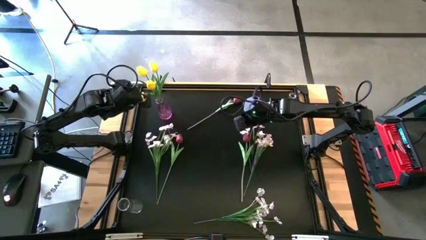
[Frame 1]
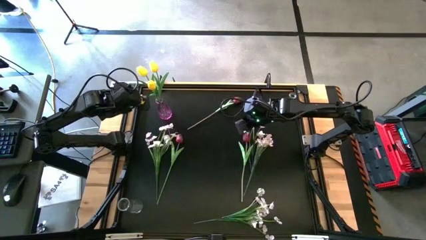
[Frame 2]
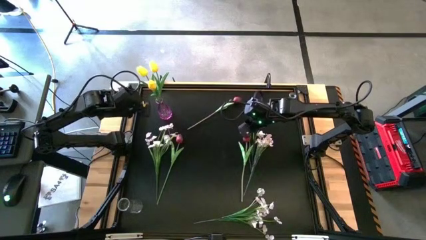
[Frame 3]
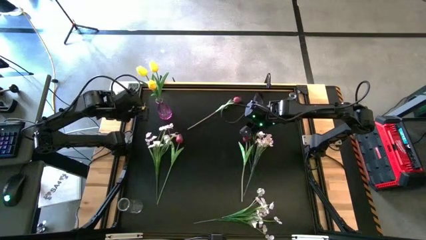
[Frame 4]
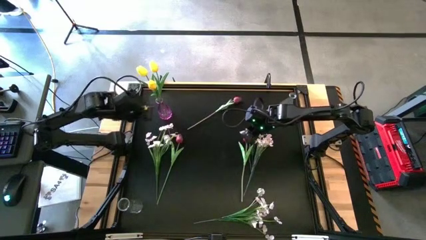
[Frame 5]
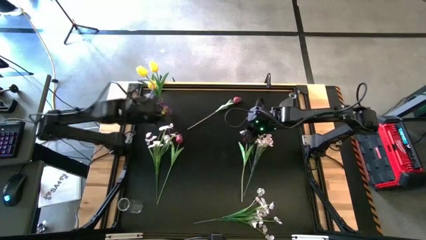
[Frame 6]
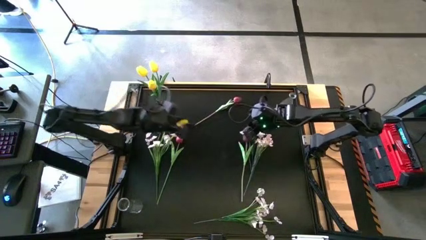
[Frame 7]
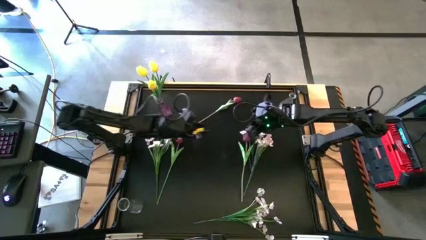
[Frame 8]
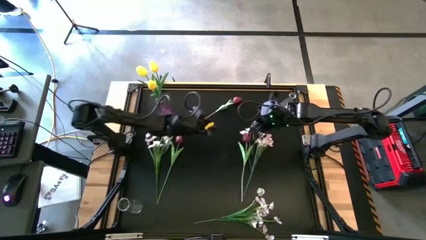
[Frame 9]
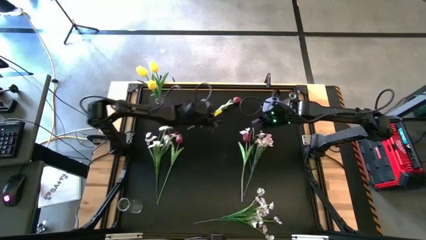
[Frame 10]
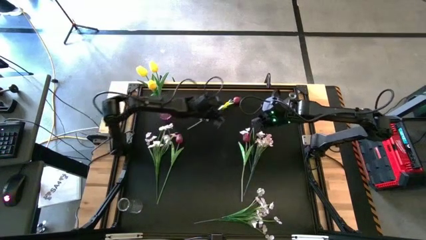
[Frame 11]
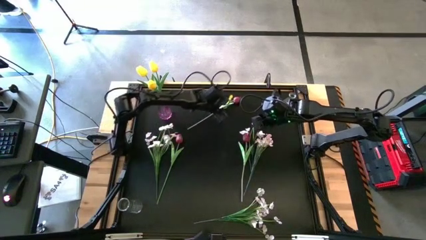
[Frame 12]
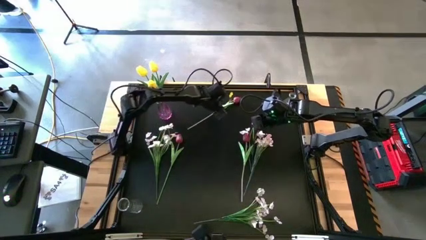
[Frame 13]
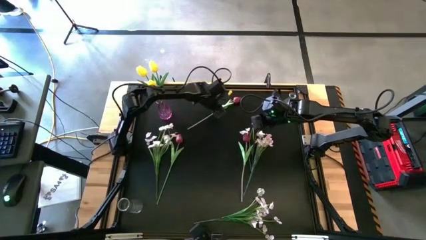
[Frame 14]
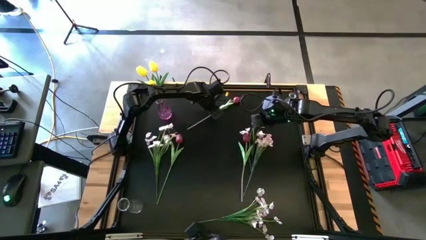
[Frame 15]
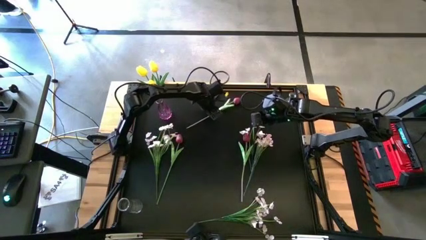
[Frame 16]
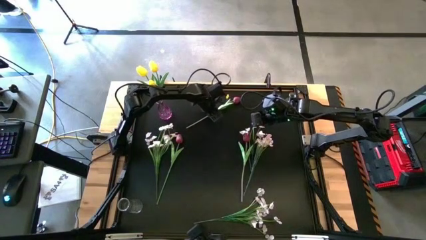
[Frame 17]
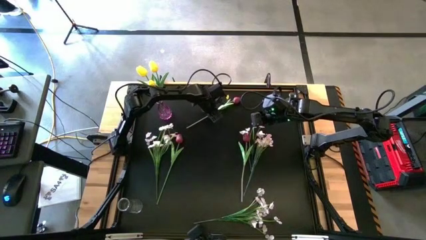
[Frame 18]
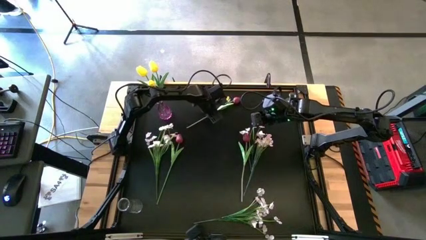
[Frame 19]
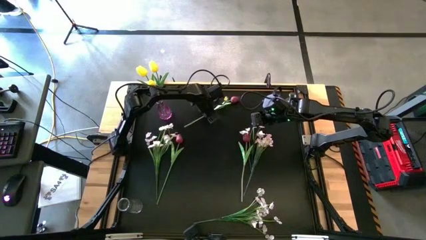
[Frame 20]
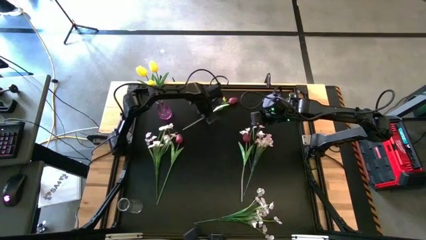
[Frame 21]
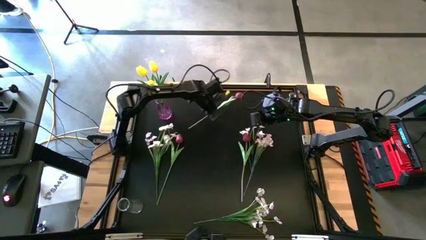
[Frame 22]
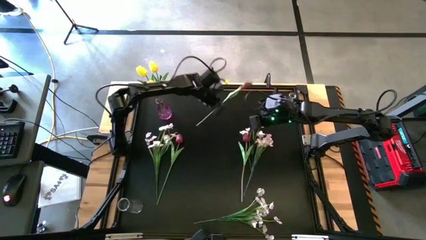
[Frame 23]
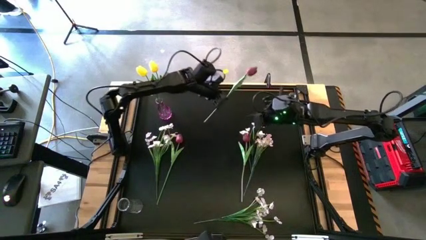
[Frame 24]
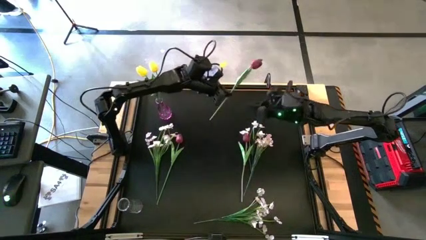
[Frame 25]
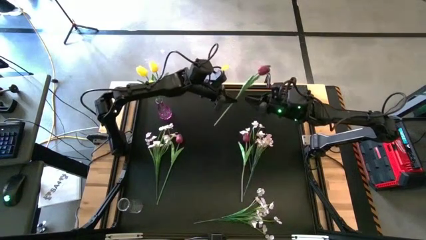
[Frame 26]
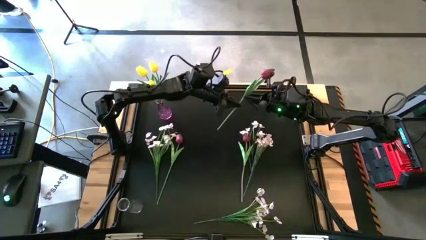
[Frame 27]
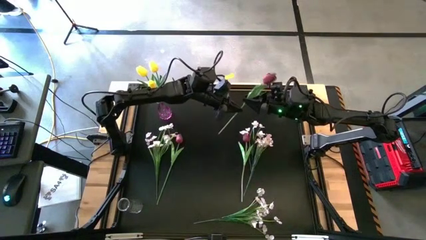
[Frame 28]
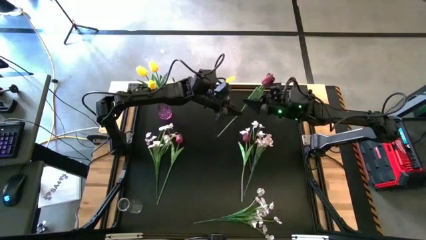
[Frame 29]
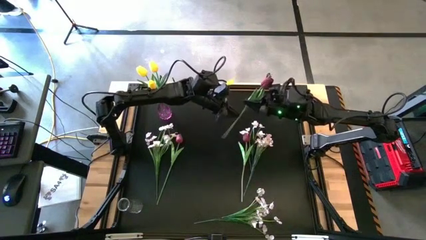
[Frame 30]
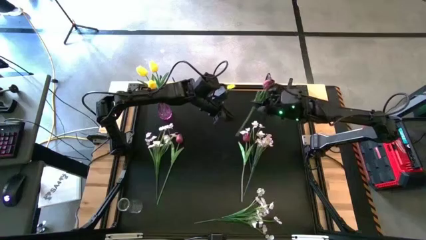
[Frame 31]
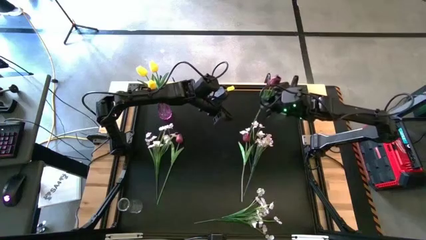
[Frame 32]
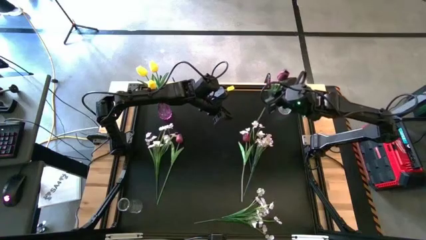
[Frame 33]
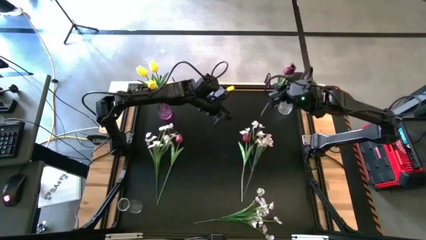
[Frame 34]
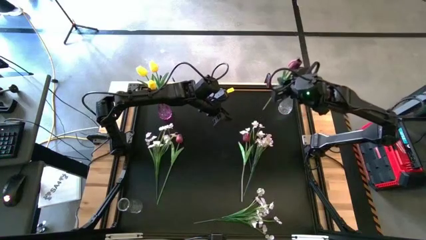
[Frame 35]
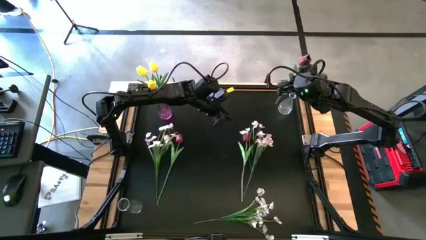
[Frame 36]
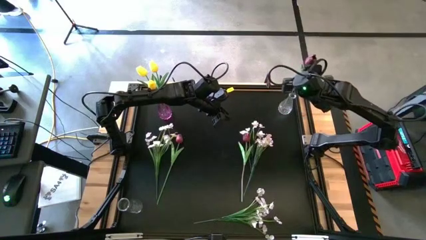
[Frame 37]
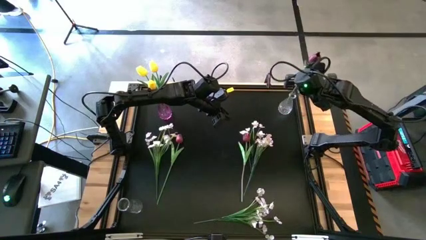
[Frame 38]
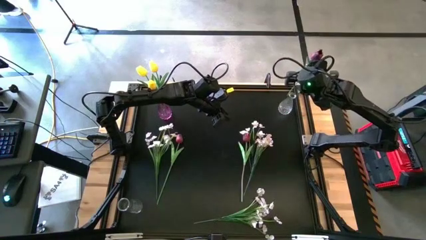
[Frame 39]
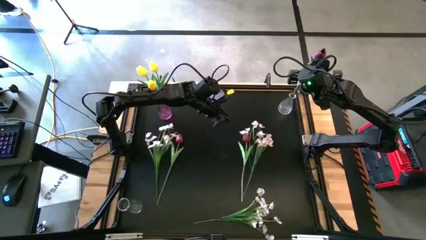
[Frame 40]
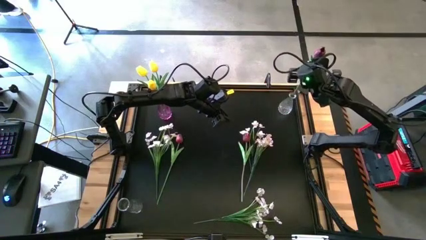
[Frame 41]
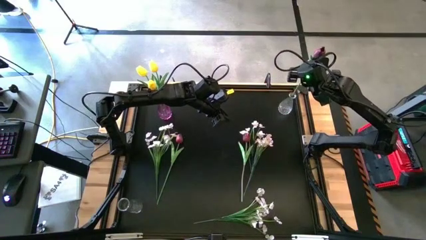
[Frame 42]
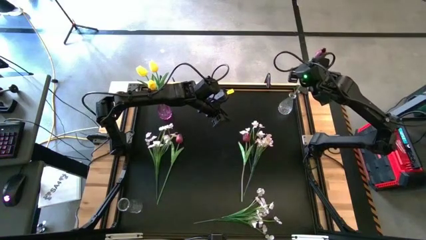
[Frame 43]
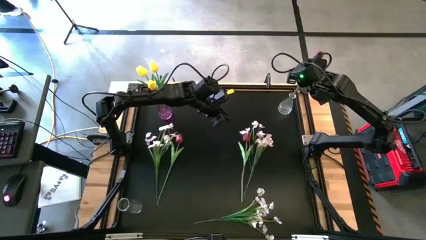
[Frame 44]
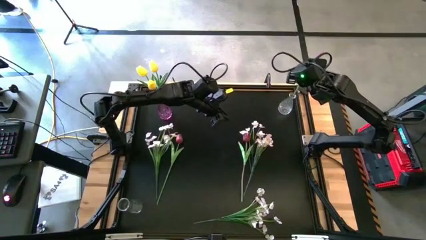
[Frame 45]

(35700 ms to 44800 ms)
Task: Sort flowers into vase by color
Put the top red flower into the top transparent vase

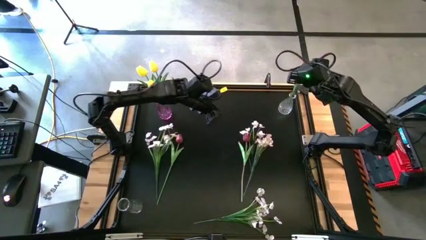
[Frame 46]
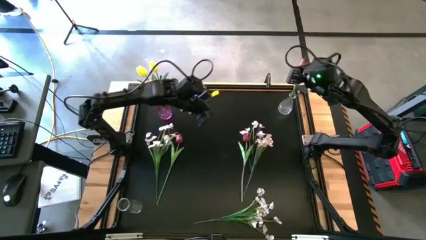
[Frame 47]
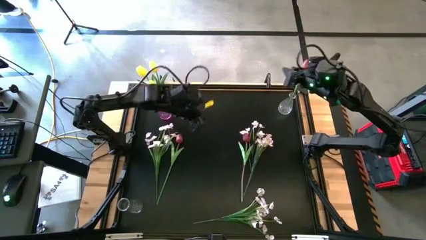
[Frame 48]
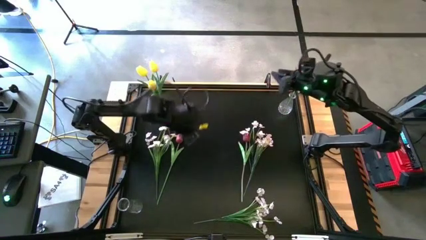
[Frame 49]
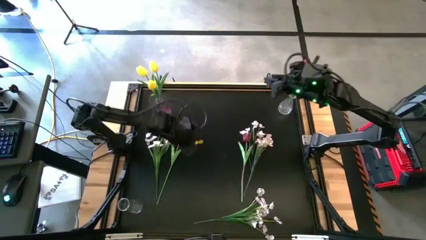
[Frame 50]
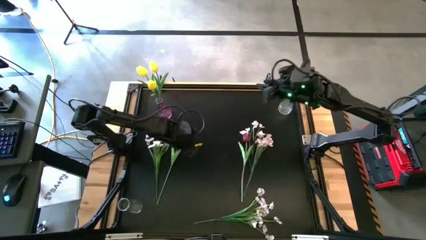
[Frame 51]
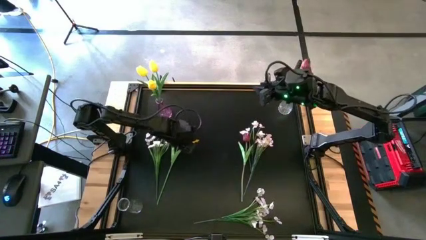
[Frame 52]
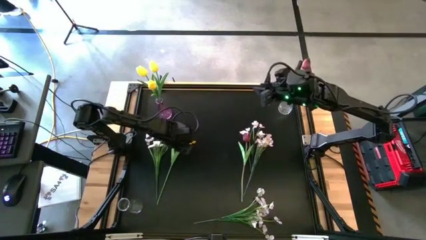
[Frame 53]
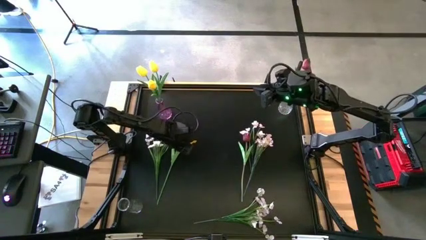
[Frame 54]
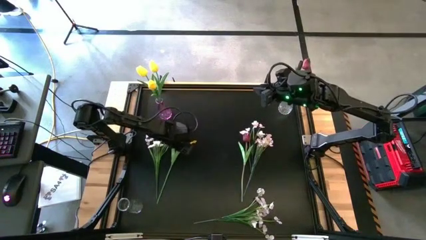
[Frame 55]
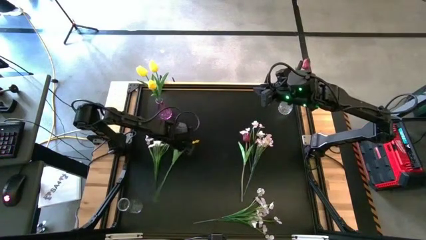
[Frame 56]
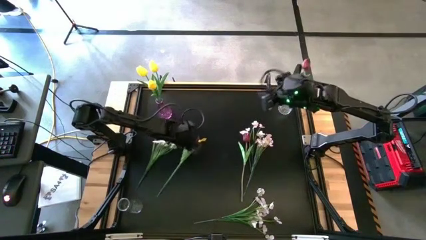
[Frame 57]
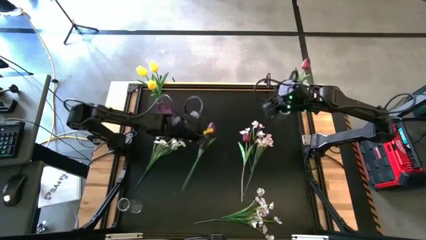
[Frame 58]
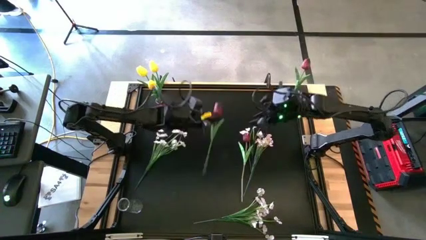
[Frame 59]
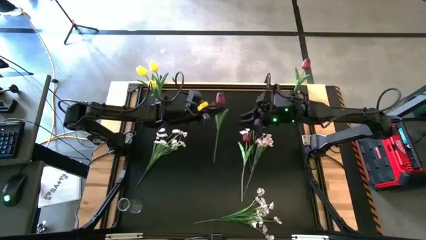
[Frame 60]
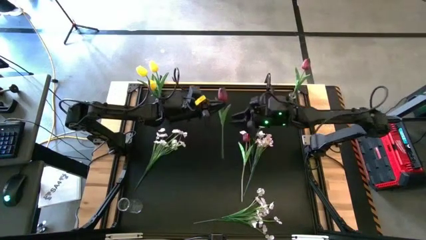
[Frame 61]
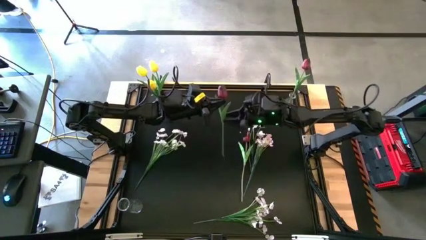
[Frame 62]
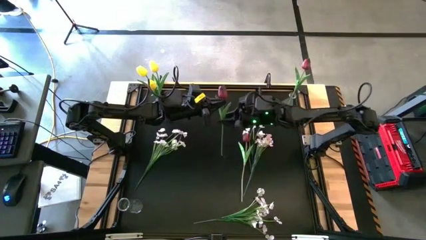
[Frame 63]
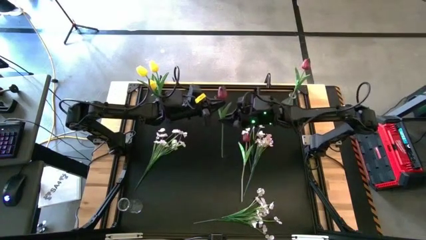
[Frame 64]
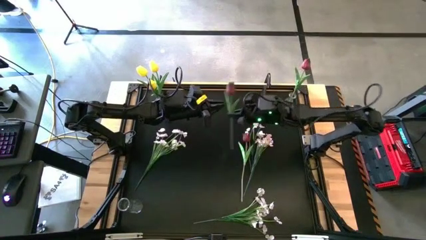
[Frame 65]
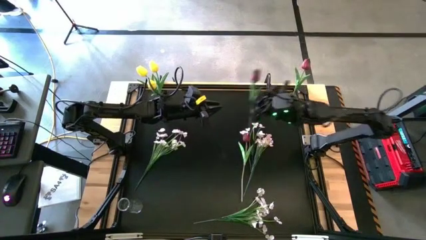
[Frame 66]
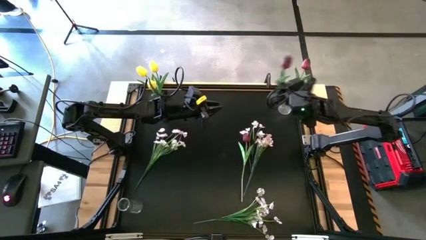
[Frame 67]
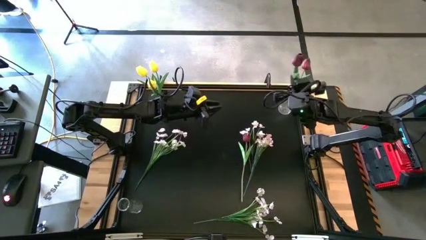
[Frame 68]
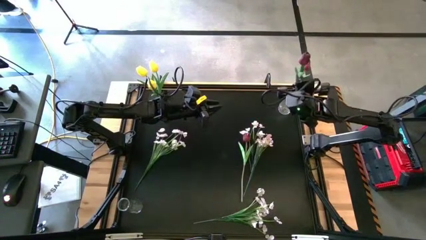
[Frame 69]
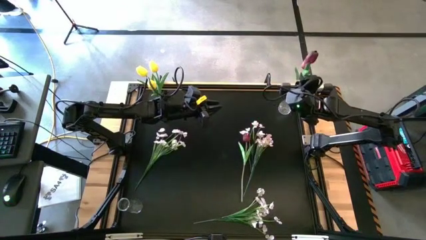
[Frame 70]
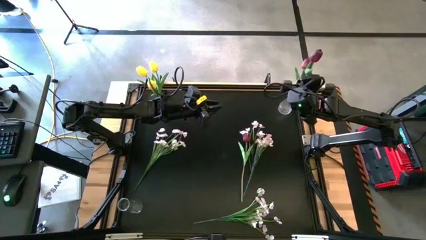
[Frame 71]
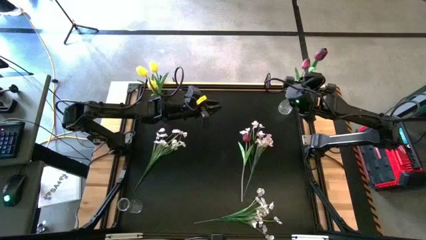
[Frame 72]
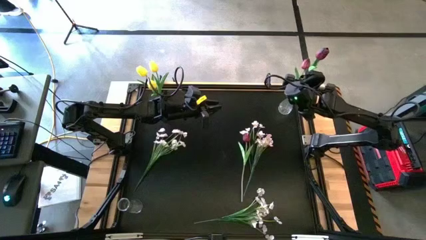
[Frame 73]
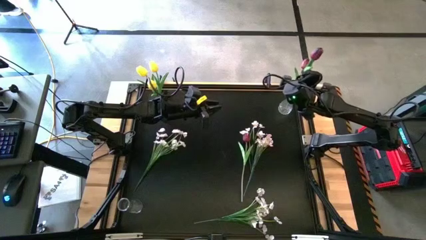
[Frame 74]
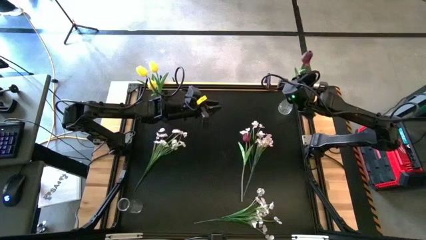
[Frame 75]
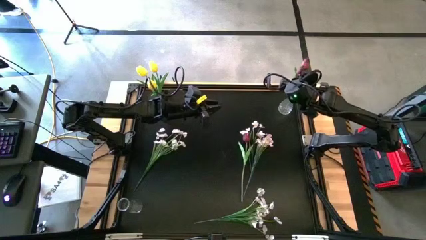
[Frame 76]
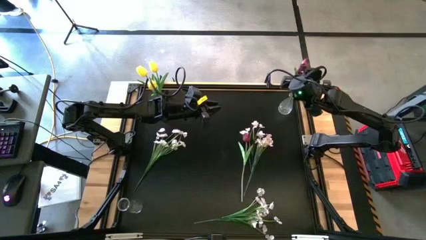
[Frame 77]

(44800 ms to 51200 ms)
Put the left red flower into the top transparent vase

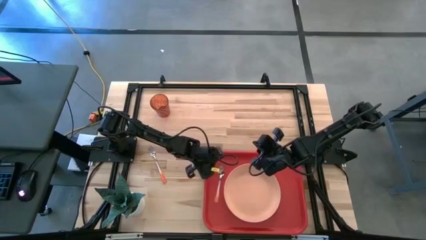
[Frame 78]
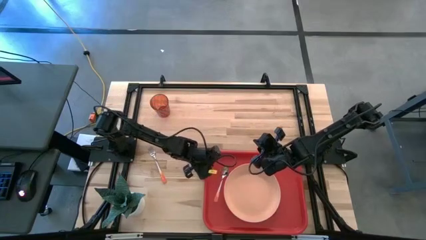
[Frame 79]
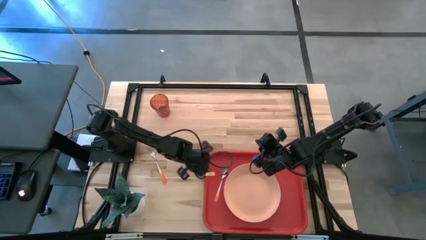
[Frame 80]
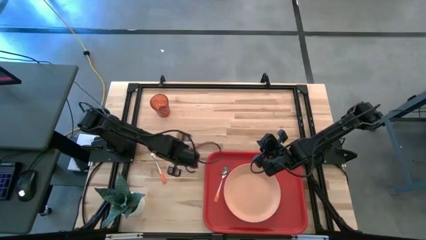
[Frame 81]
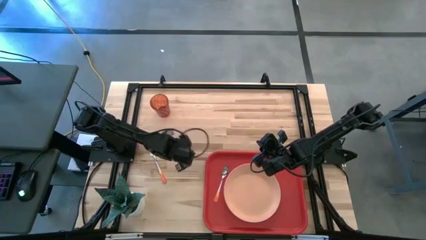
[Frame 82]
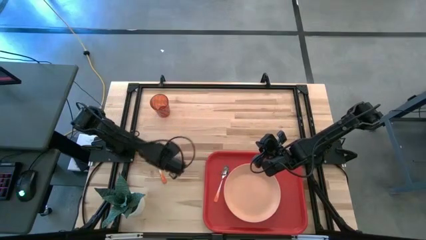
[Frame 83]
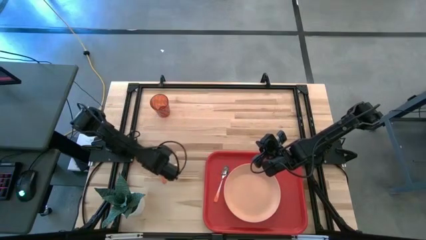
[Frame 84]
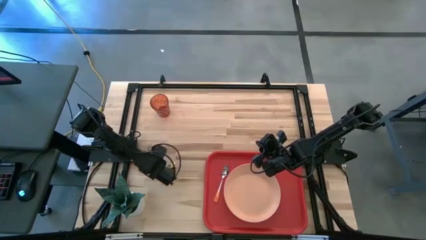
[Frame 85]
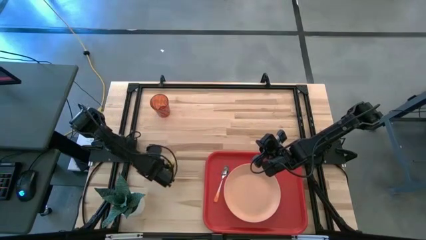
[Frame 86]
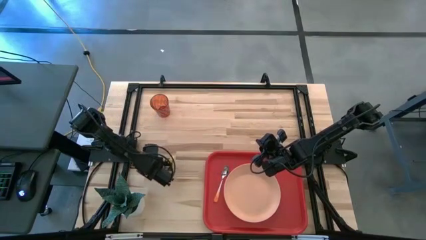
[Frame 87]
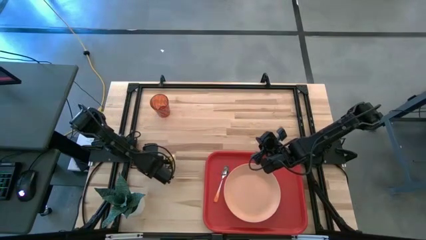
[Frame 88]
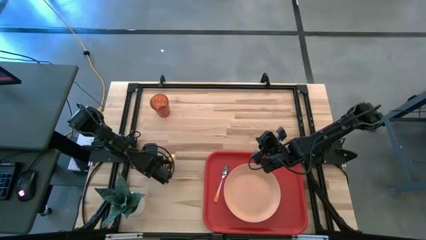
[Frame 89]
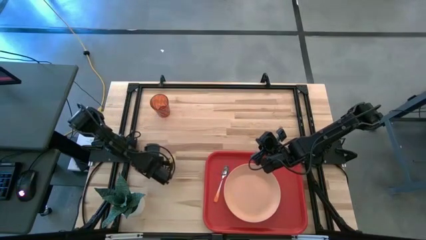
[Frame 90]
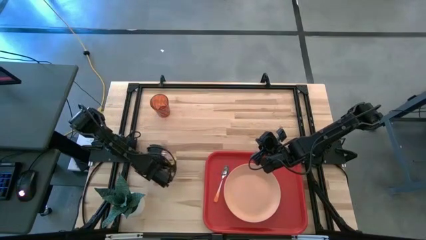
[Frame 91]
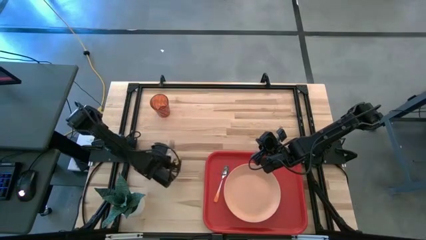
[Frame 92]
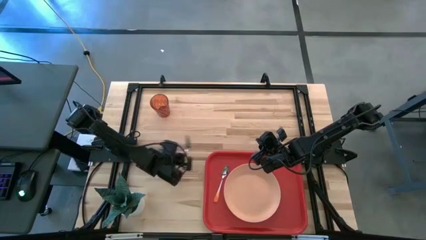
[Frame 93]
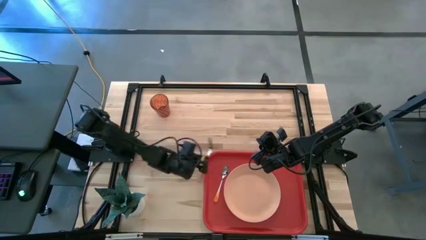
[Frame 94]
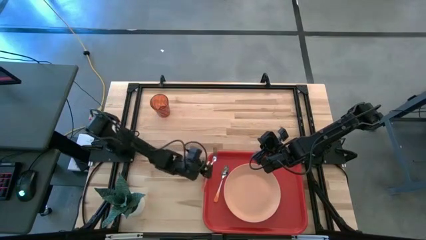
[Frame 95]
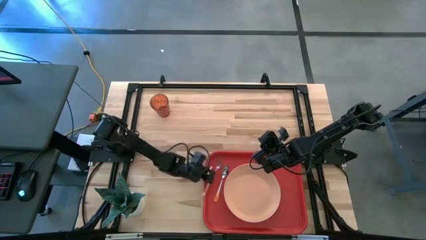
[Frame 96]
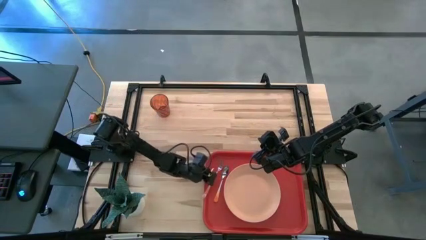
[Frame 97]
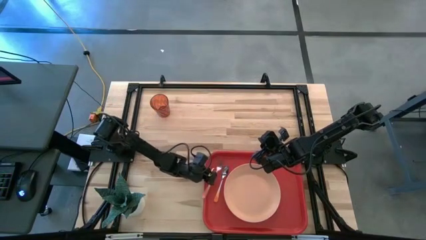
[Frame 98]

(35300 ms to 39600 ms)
Task: Pick and place plate/cup/fork/spoon on tray
Put the orange fork on the red tray to the left of the orange spoon
